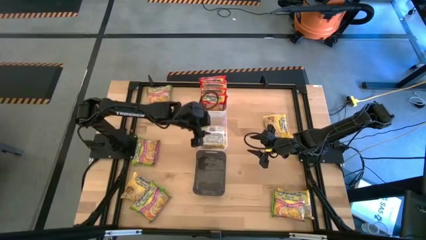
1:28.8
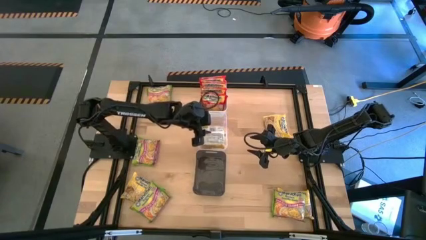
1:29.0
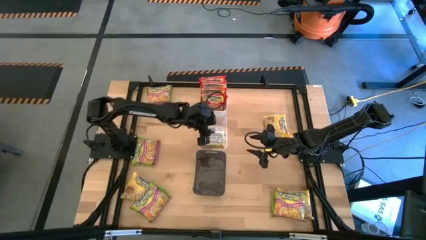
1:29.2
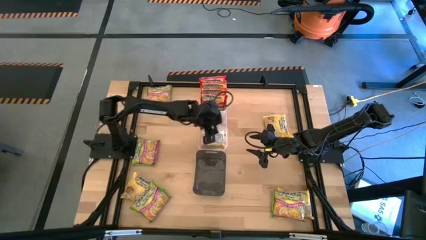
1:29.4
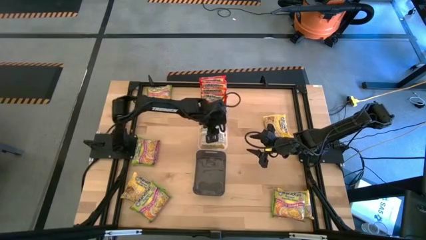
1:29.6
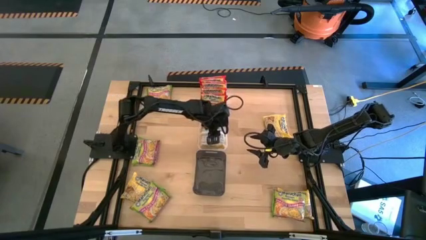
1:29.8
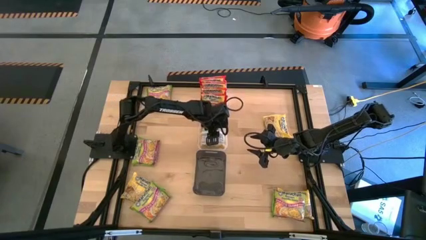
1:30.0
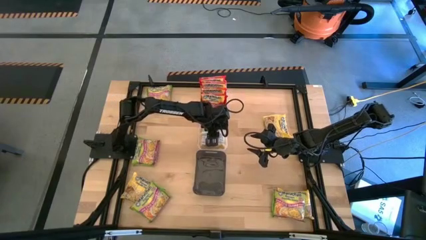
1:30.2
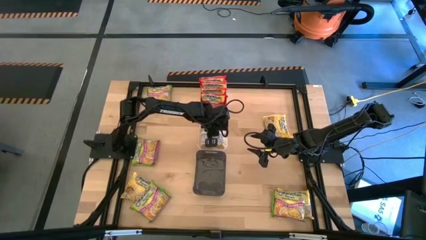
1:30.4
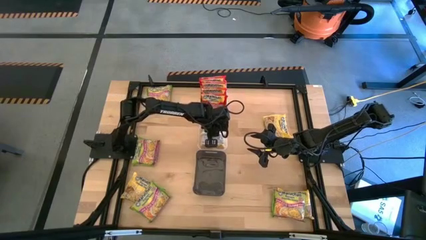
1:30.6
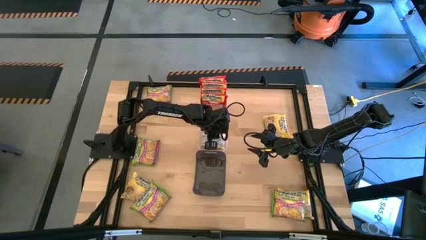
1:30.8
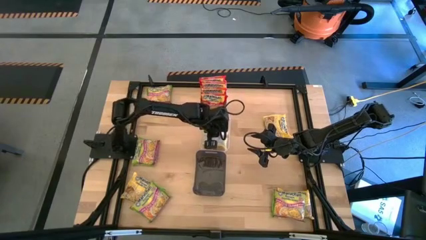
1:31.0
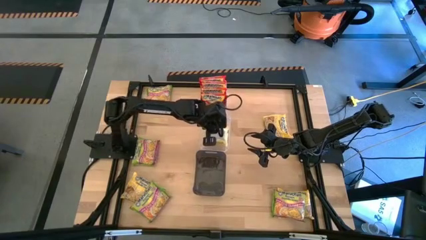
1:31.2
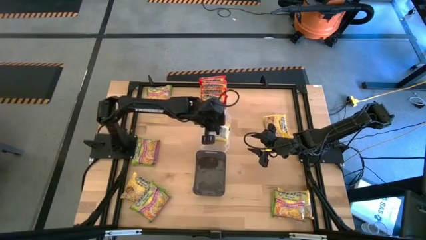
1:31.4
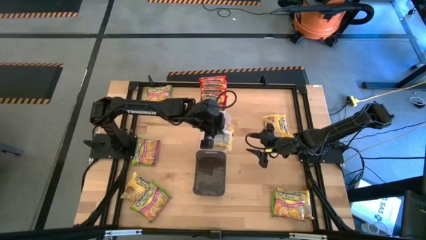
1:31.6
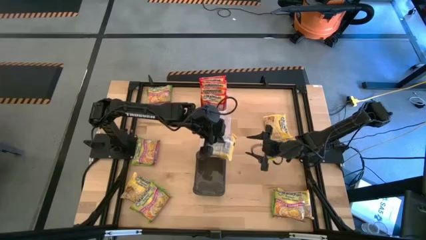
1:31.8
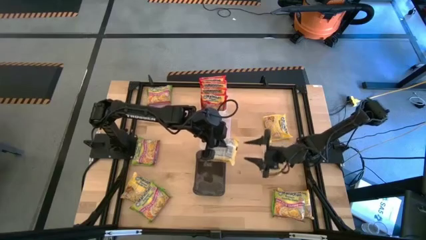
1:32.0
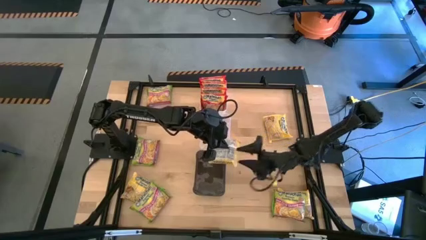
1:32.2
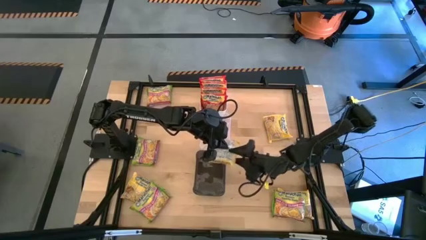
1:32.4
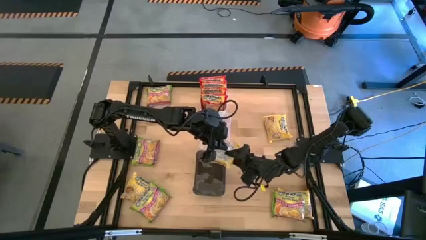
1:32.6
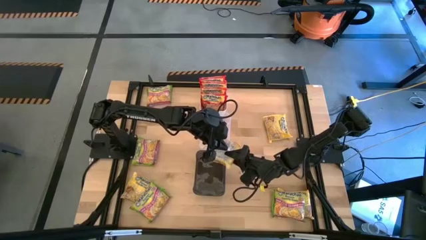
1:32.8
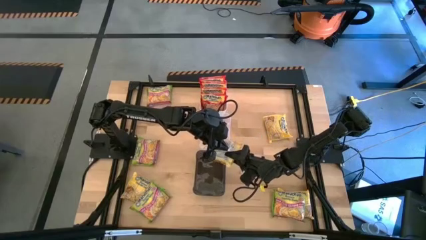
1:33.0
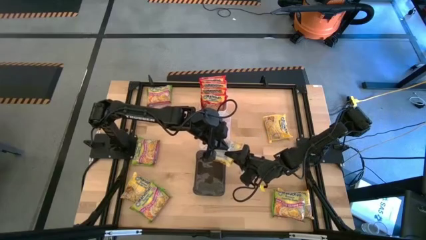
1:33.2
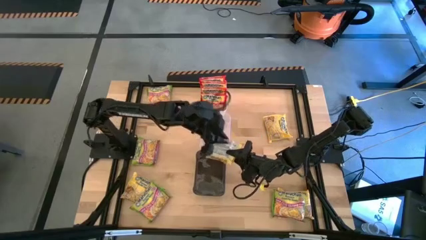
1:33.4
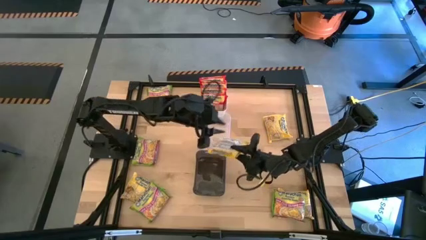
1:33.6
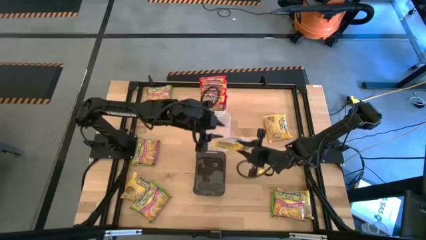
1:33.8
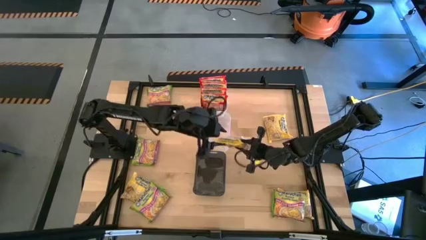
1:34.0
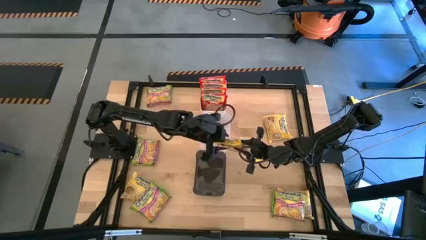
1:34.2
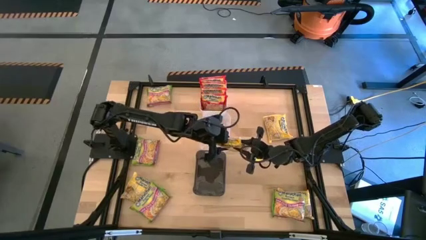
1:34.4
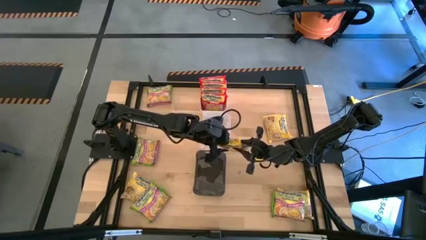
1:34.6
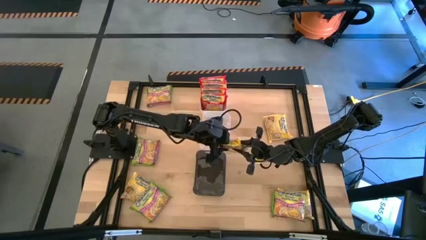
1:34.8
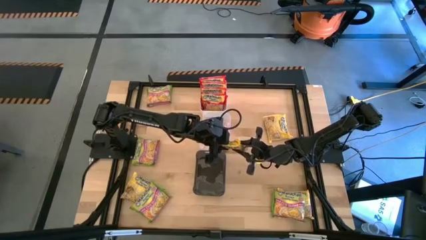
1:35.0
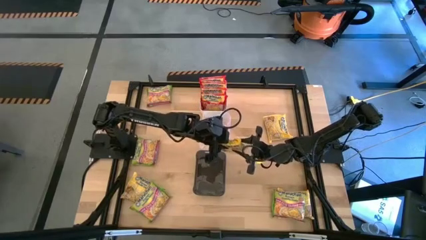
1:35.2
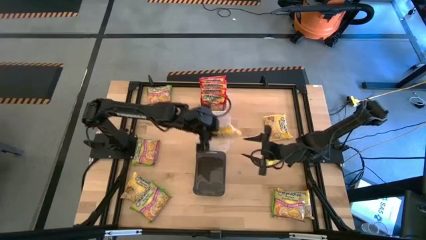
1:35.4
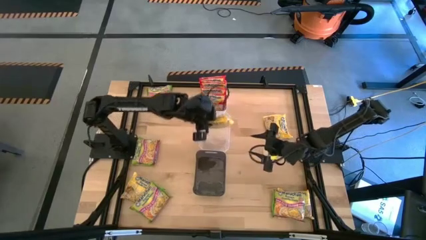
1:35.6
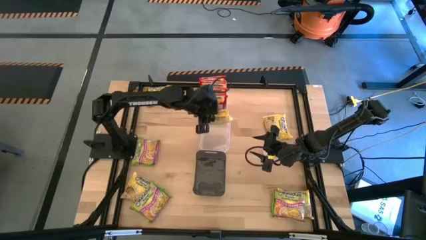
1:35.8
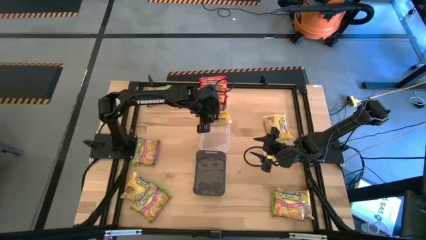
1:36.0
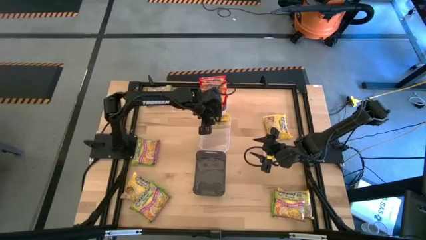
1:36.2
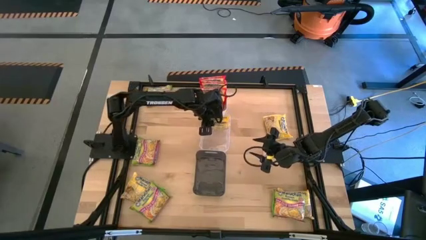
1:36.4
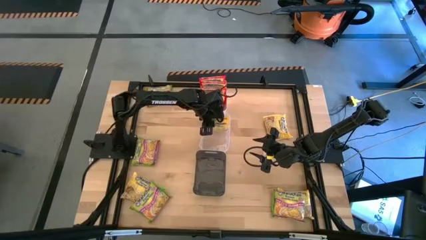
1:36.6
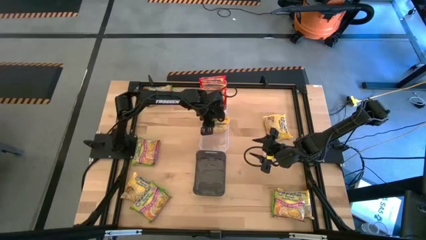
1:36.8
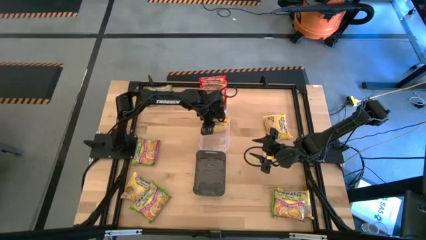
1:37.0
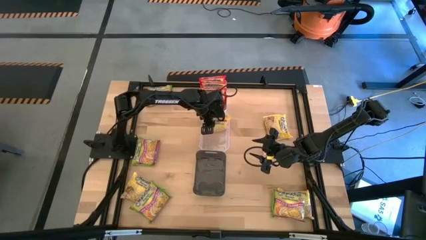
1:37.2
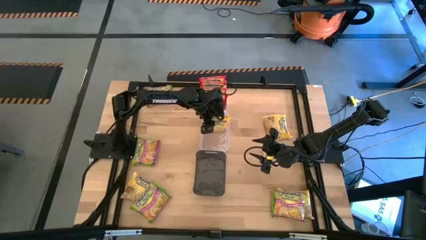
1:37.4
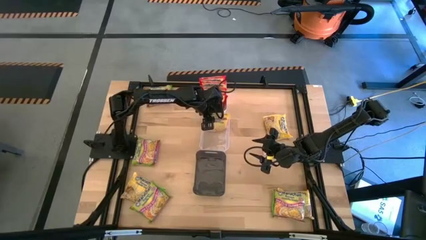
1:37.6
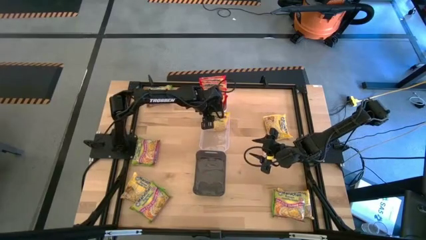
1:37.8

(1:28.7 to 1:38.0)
Task: Sort Maruchan noodles
Put the yellow noodle pack into the transparent bin

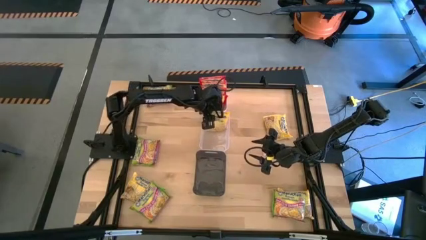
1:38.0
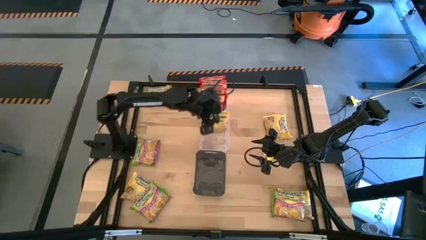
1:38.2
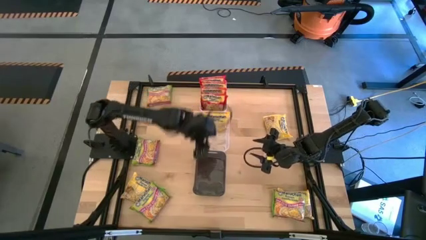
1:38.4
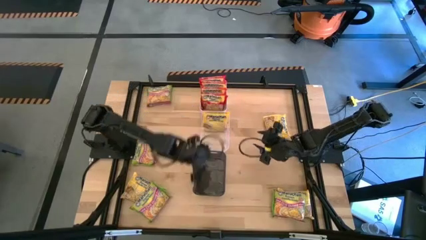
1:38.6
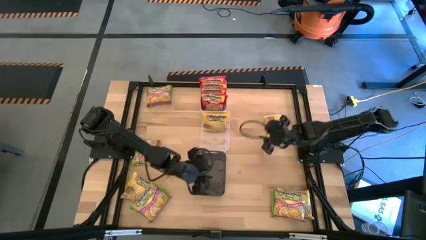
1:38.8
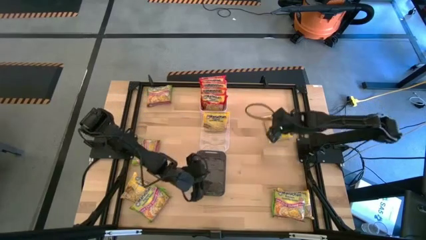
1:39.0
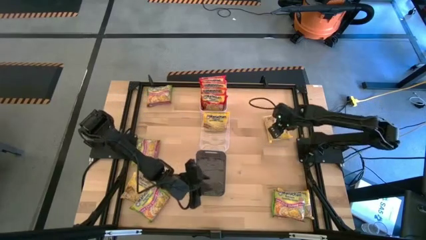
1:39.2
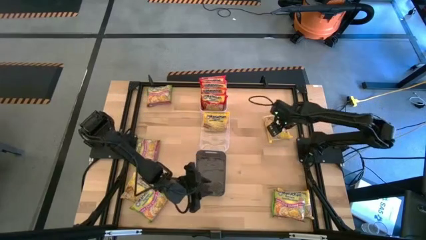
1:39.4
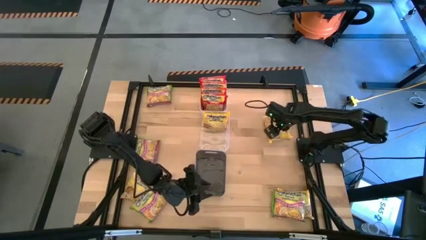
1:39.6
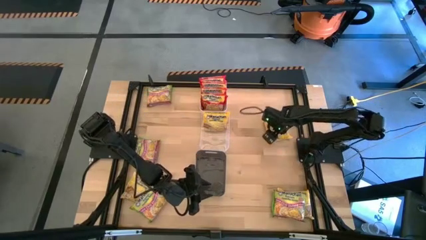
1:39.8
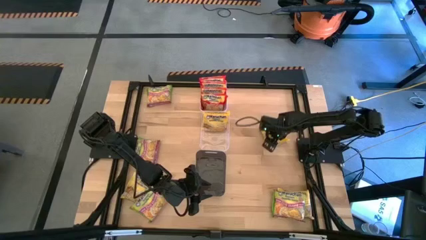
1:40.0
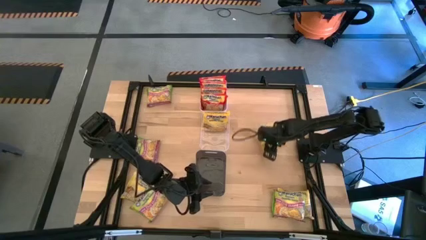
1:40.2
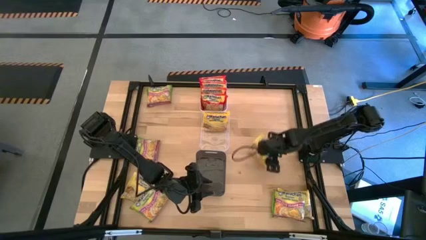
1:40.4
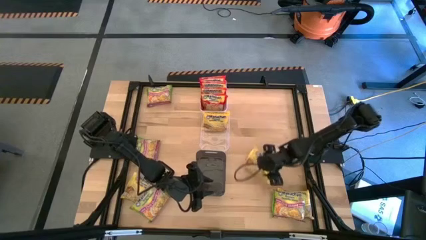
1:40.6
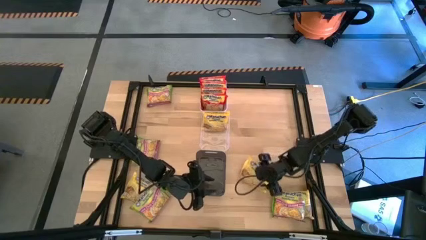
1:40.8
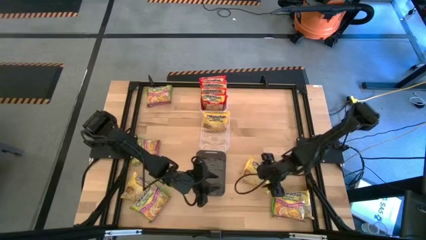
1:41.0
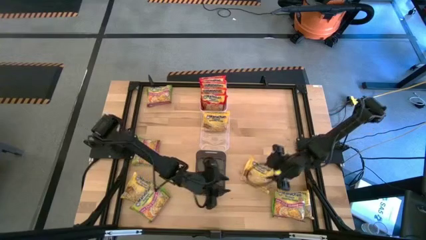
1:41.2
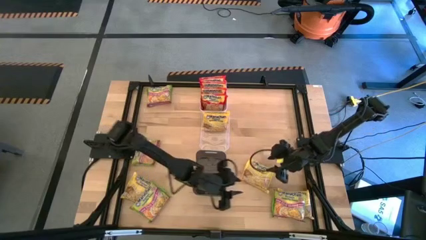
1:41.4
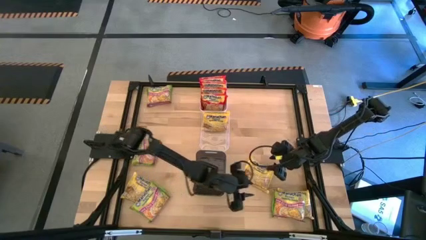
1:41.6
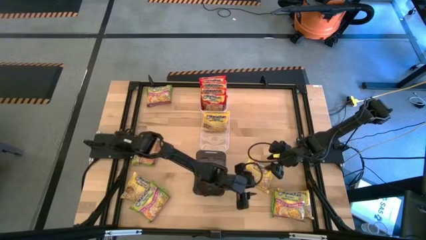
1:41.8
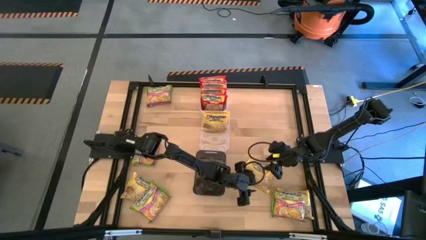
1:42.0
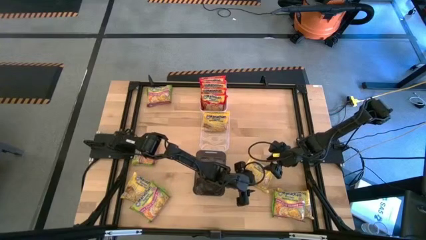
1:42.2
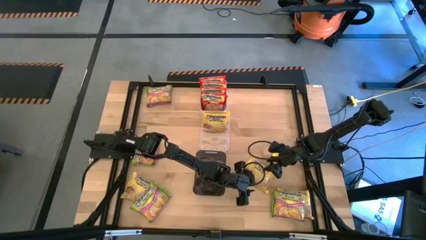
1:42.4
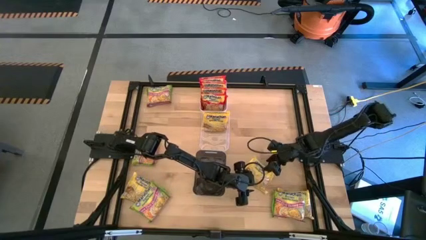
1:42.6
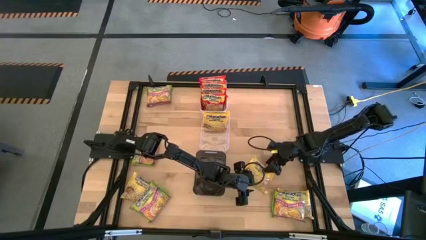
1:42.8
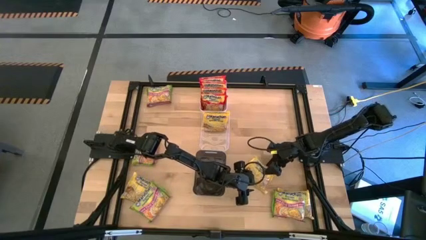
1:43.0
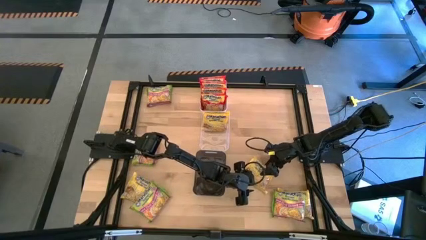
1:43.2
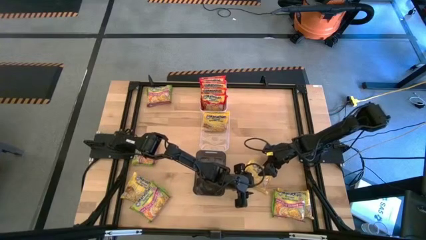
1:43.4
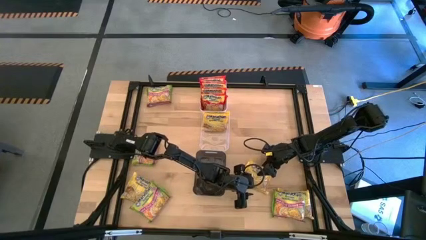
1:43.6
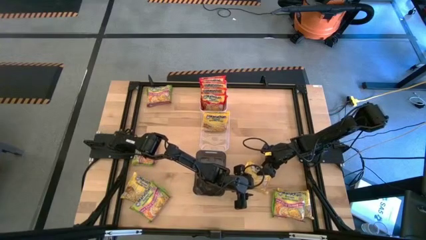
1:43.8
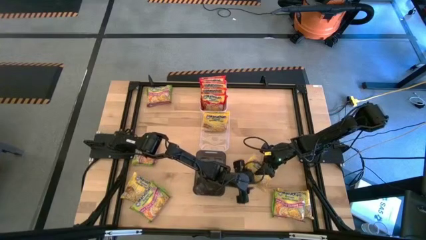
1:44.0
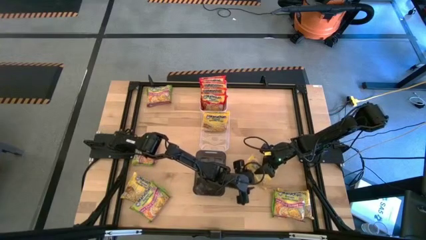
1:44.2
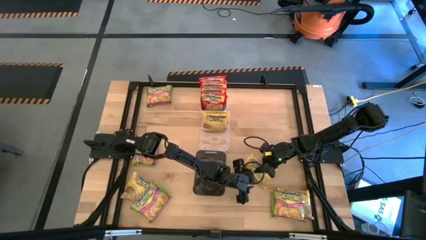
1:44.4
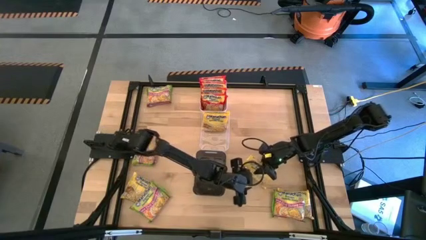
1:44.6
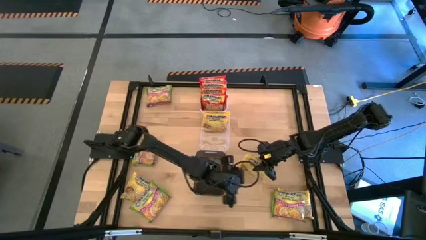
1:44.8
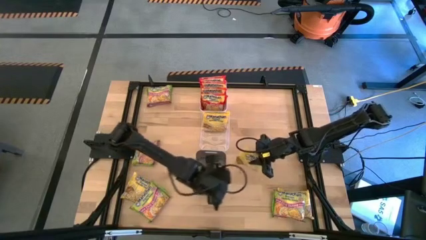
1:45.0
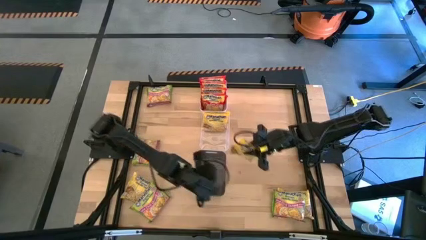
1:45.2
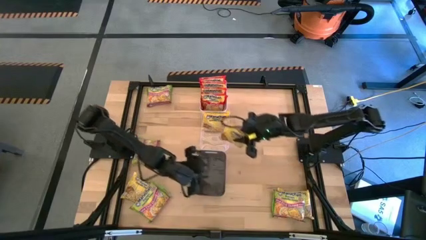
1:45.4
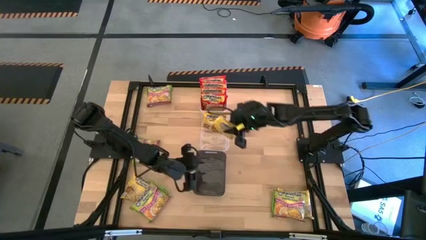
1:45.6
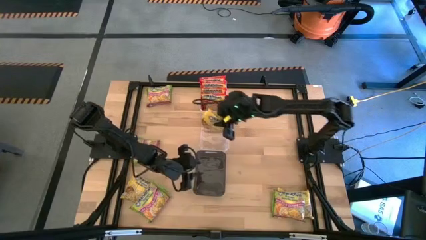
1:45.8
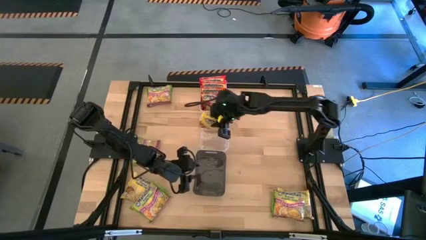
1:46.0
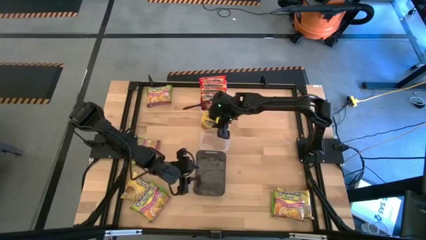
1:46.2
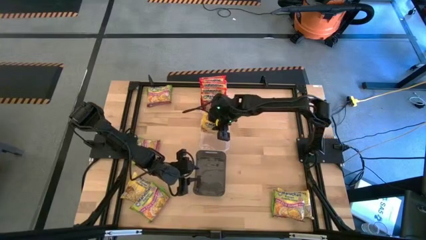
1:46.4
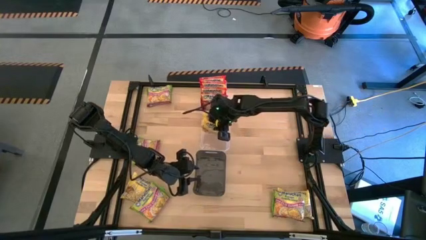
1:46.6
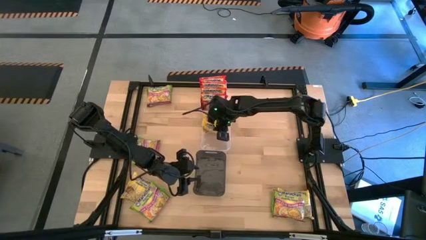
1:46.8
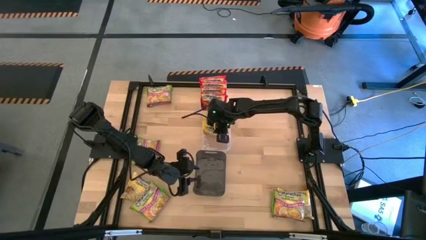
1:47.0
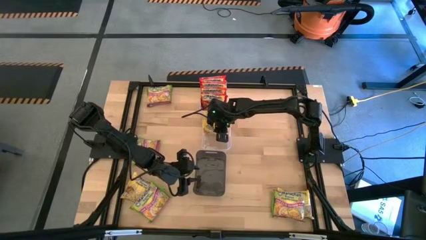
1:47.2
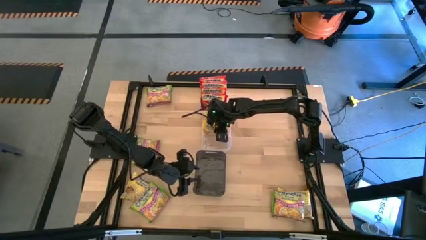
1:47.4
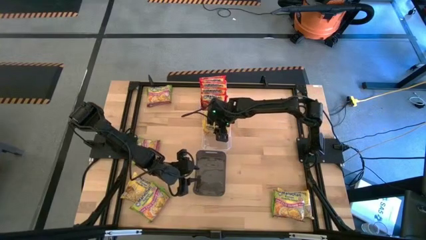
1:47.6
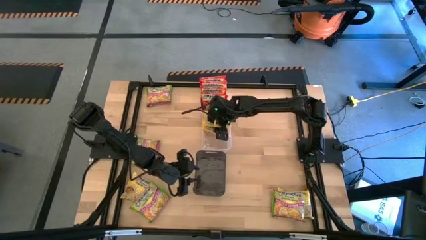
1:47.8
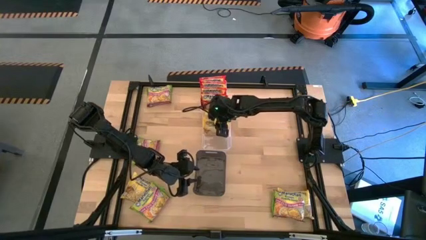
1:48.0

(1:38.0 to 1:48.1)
Put the yellow noodle pack into the transparent bin
